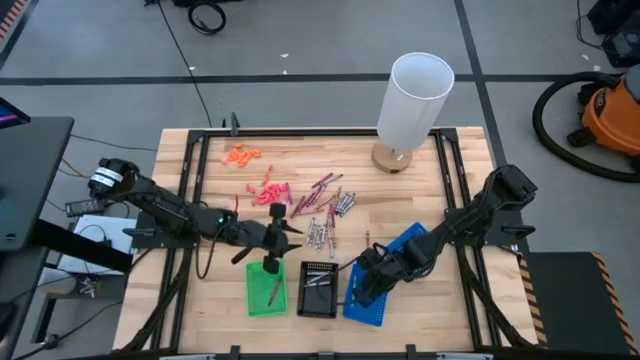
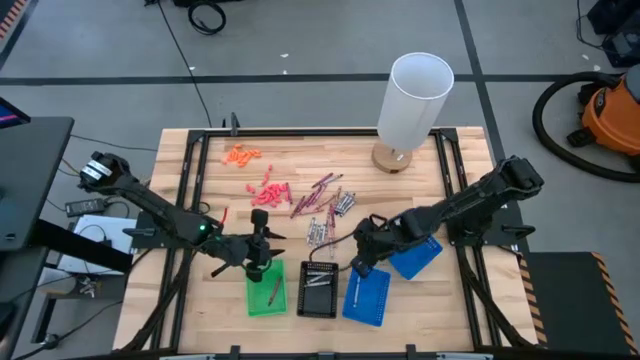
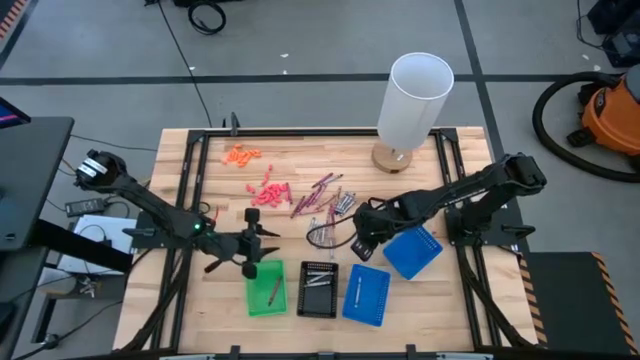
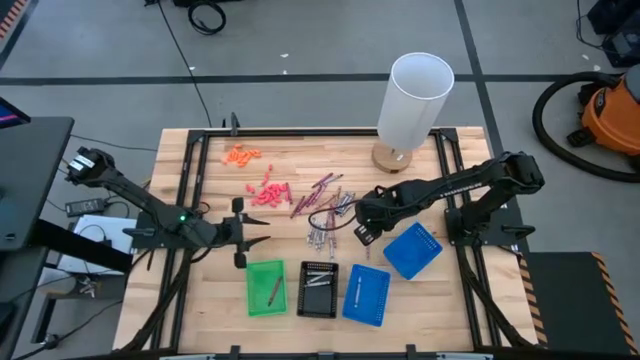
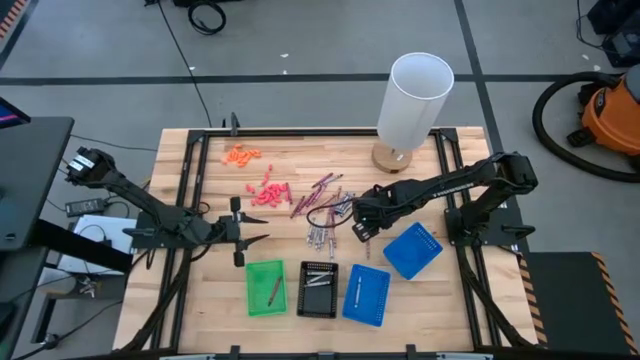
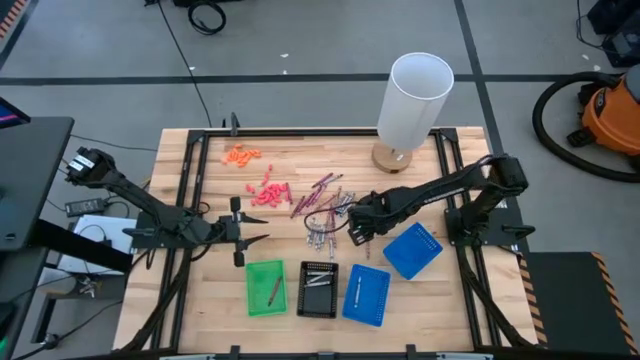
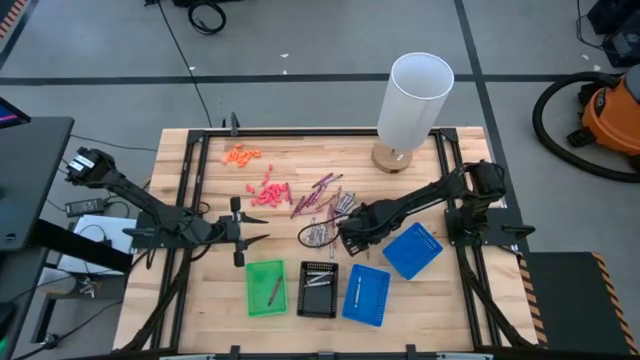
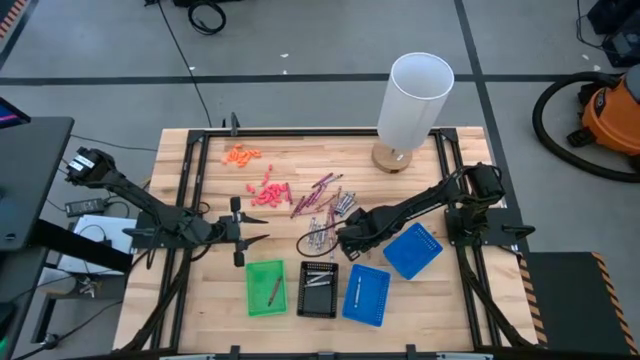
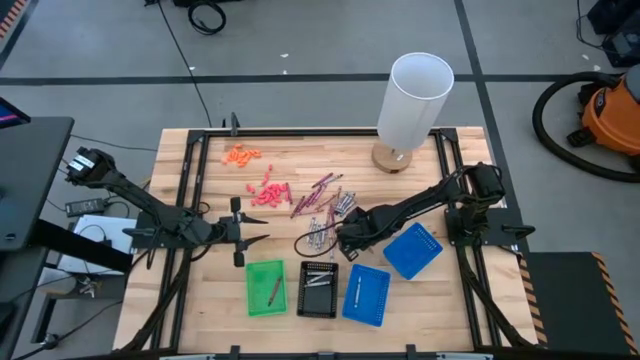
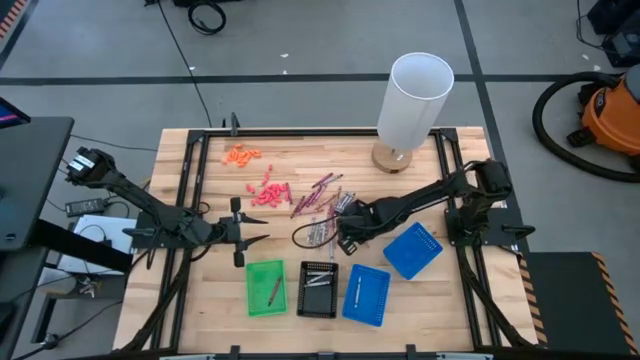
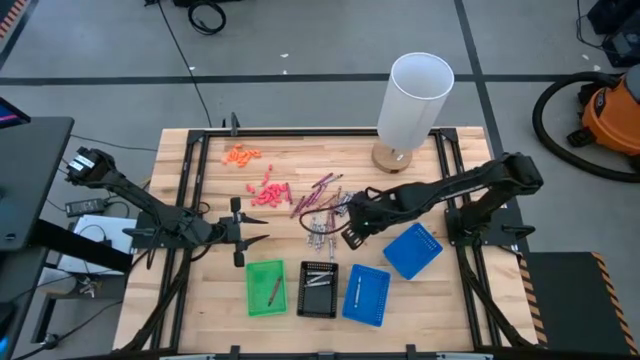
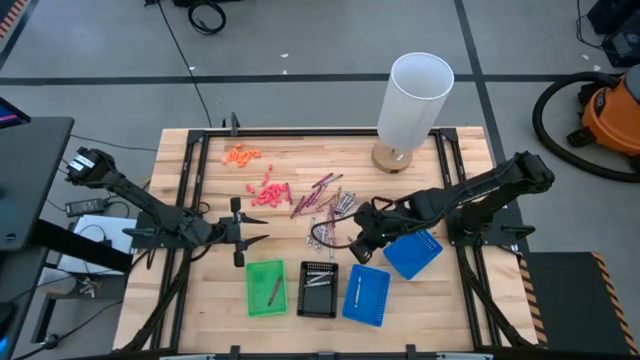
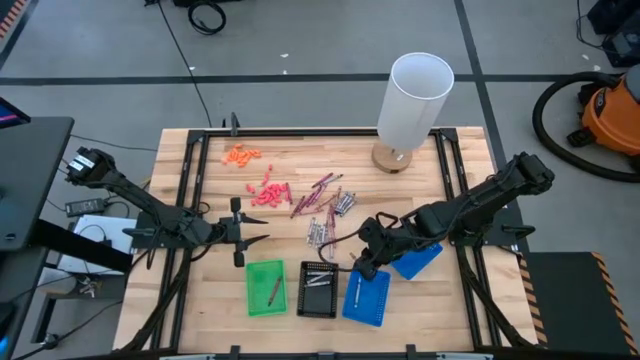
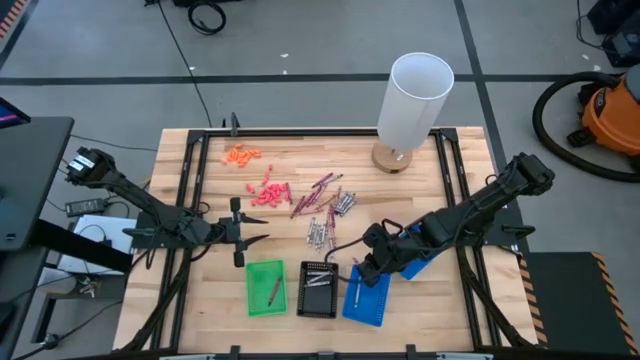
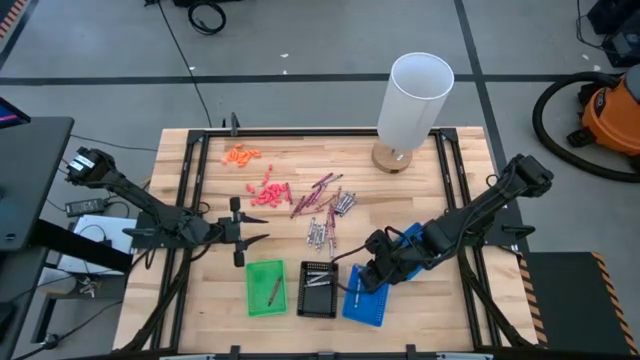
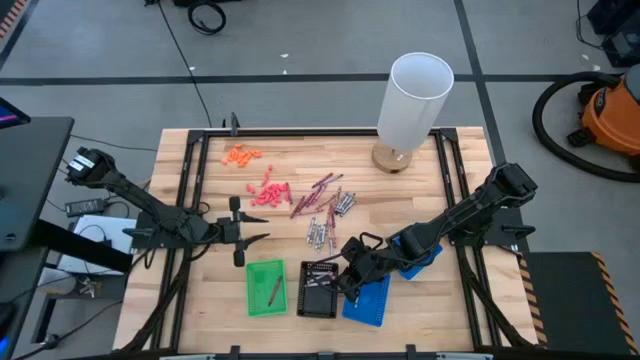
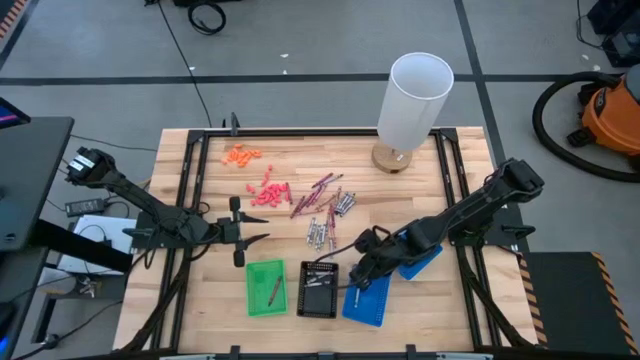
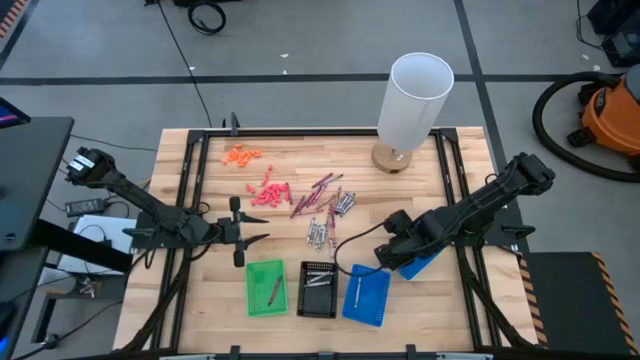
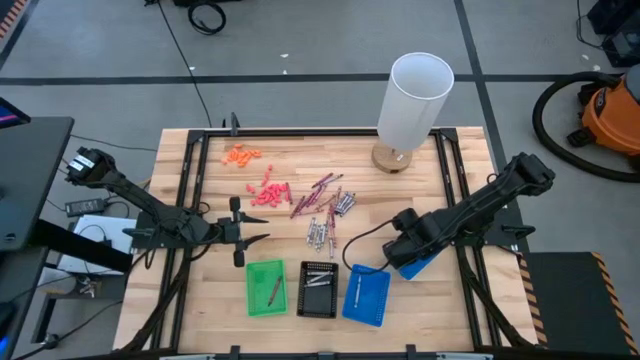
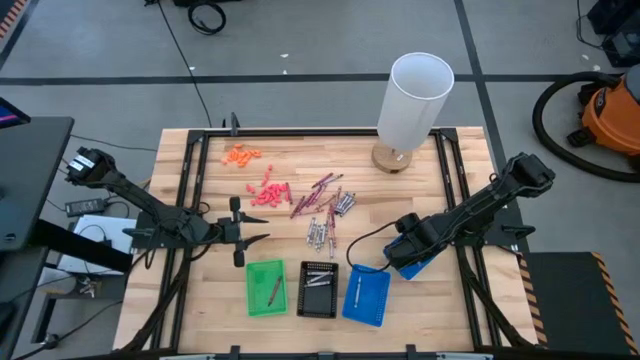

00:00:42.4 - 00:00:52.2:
Task: Sort crayons
Put the pink crayon into the right blue basket

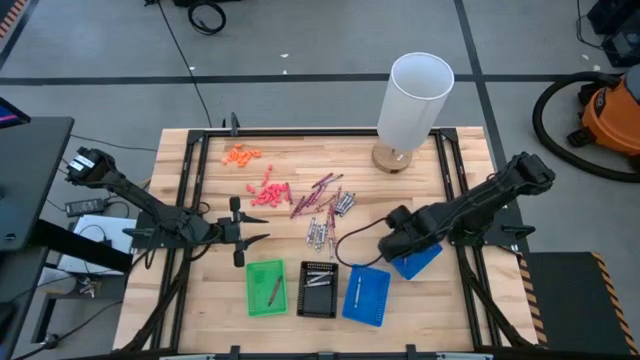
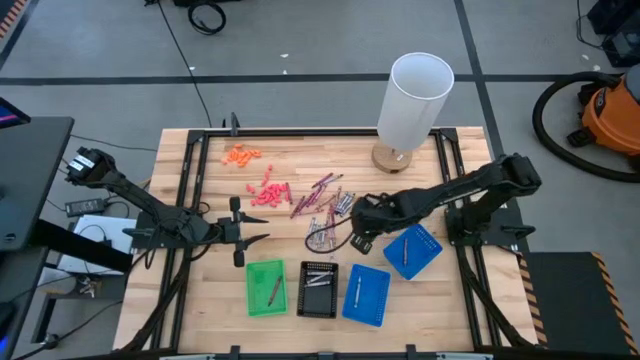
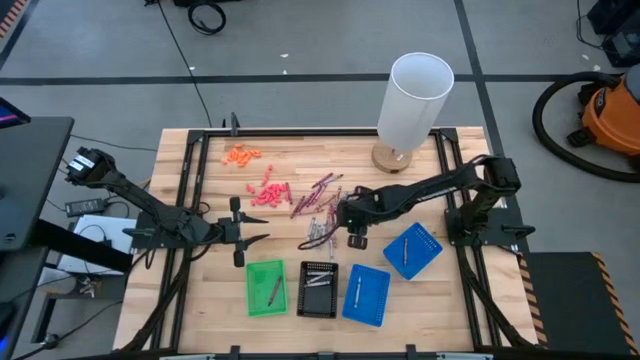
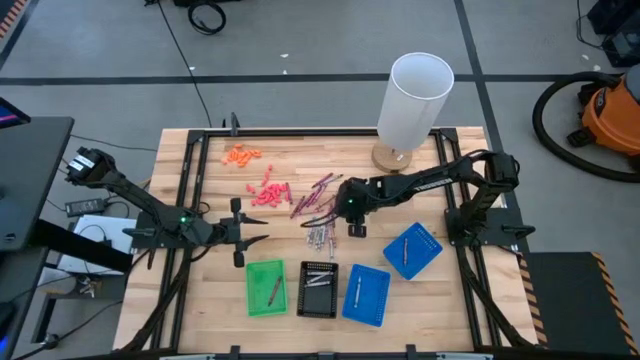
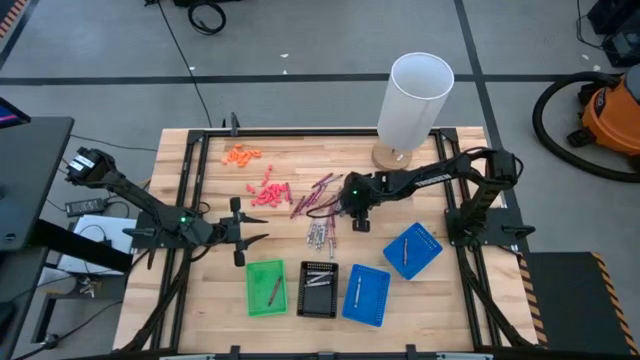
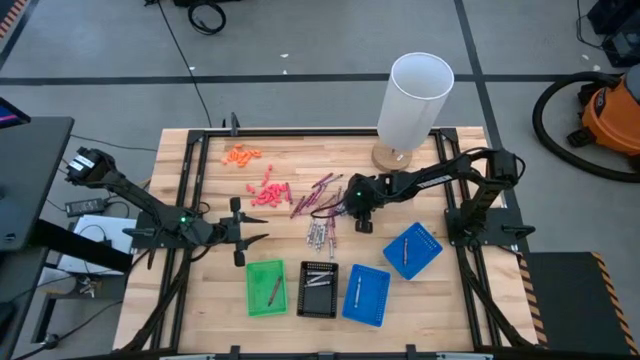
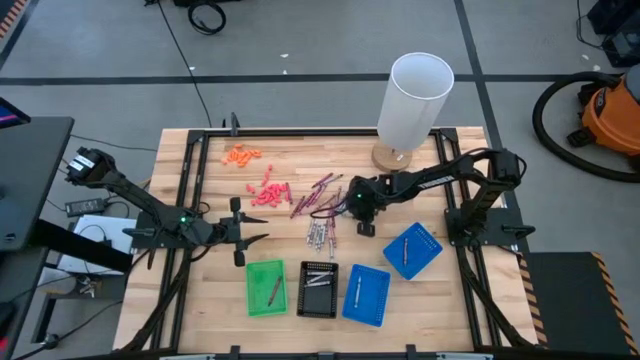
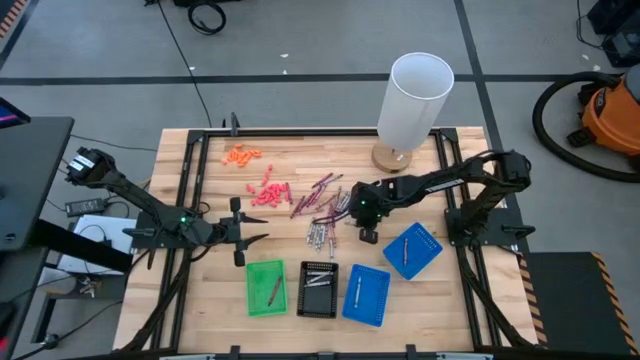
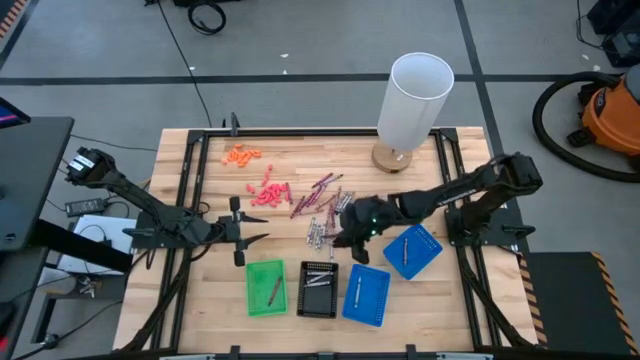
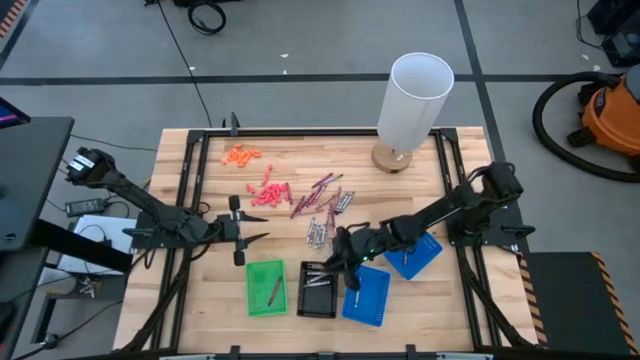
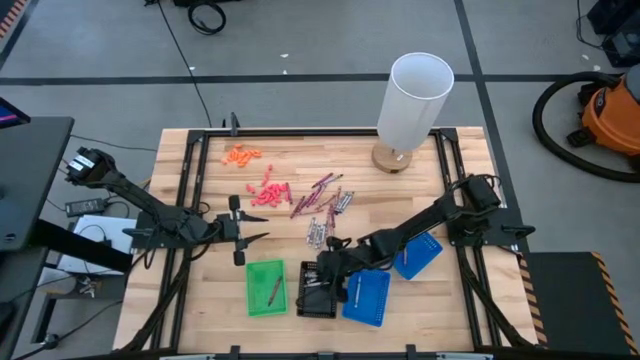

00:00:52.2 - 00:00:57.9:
Put the black crayon into the black basket

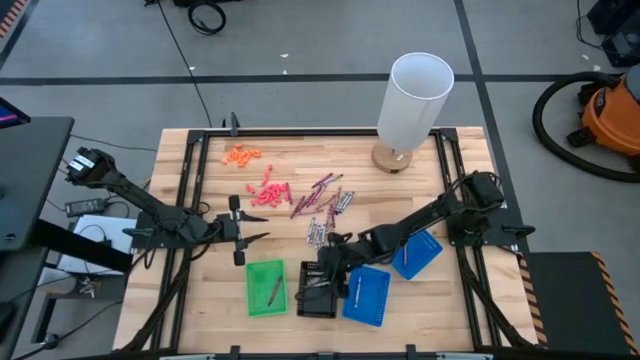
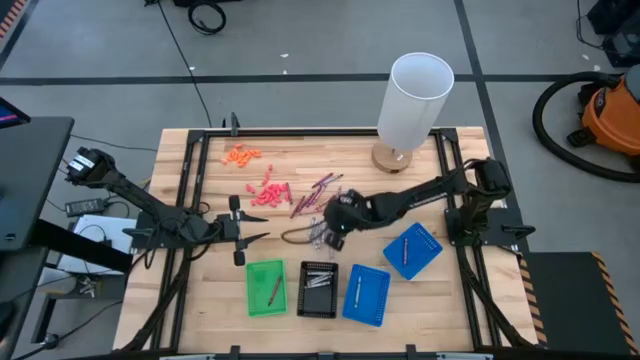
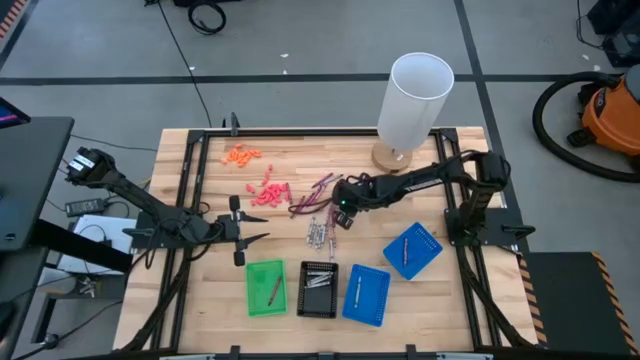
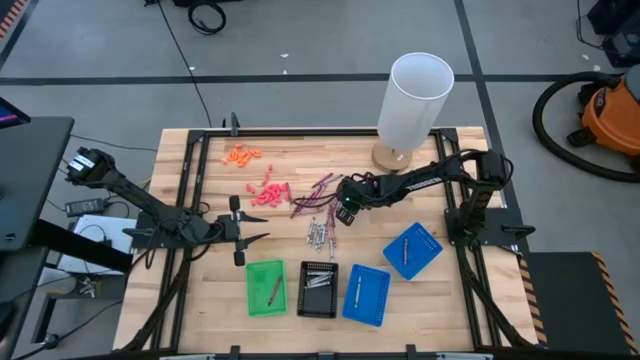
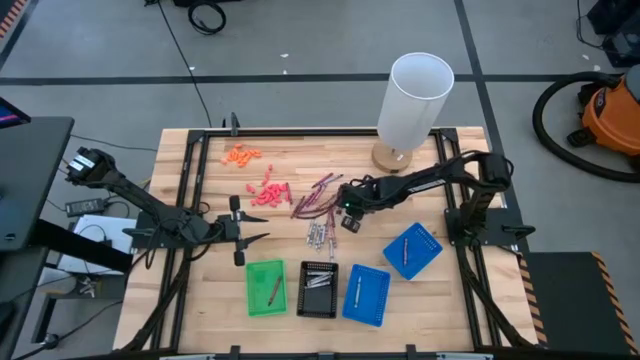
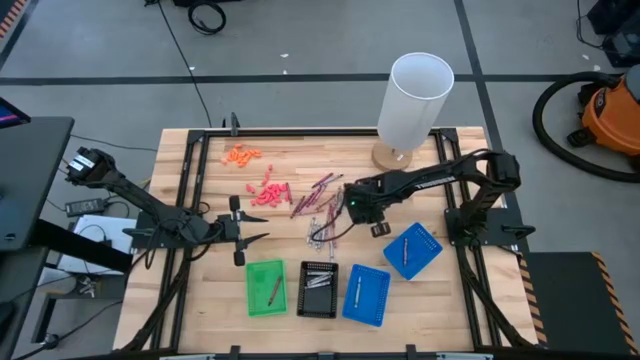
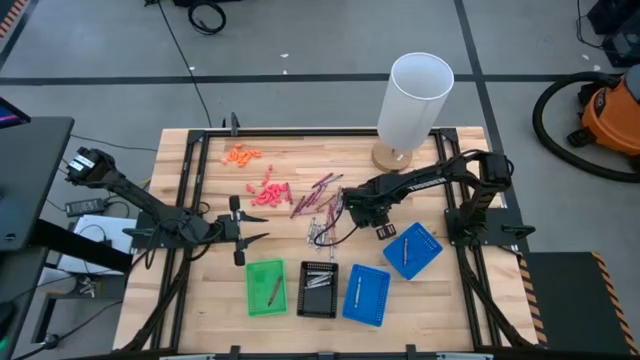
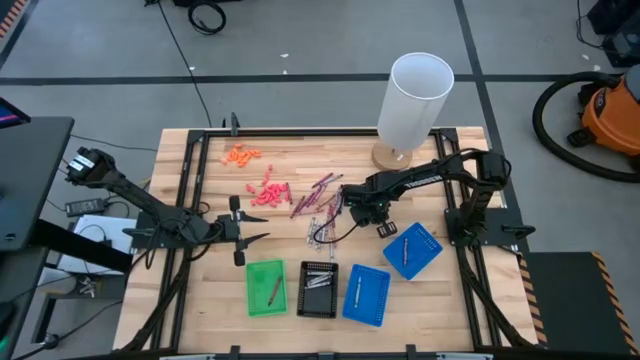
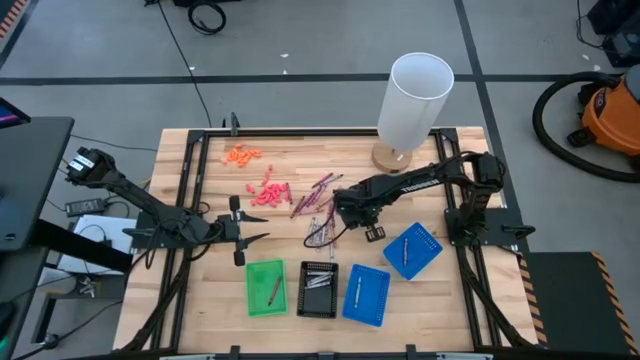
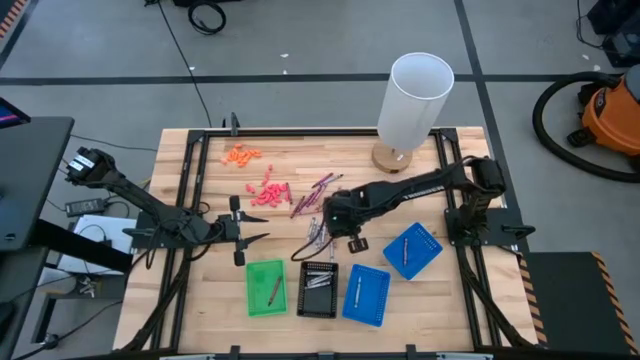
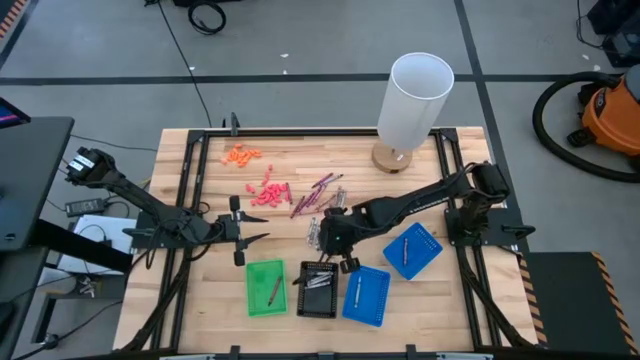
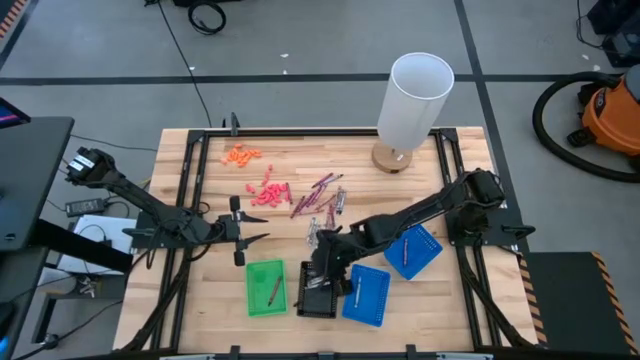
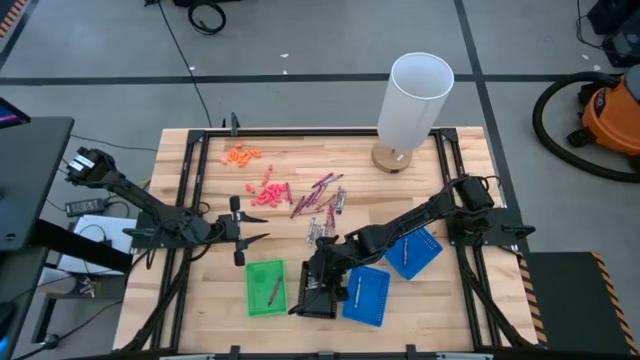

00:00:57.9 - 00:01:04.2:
Put the black crayon into the black basket
